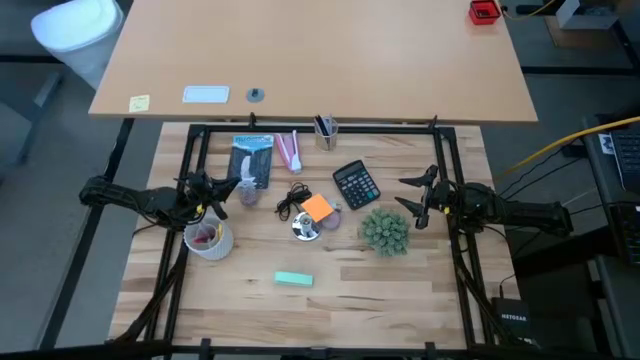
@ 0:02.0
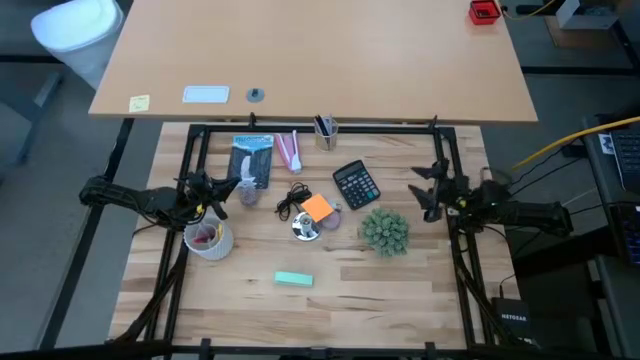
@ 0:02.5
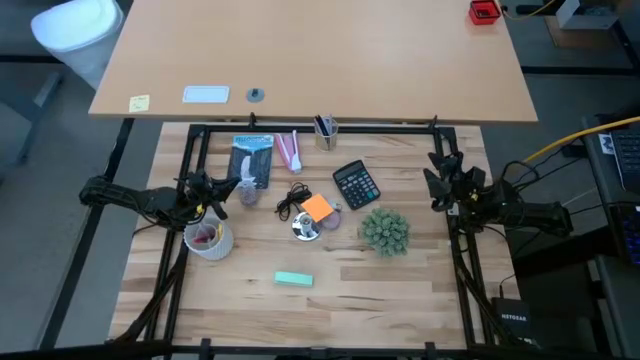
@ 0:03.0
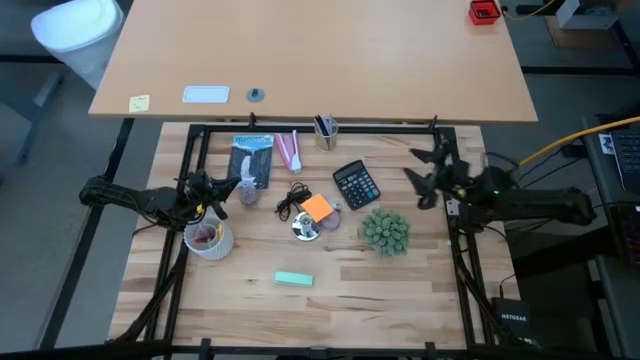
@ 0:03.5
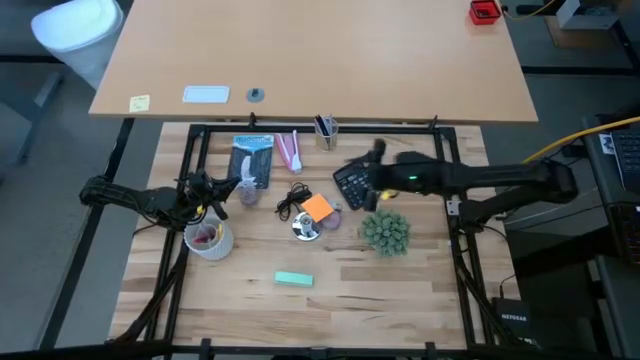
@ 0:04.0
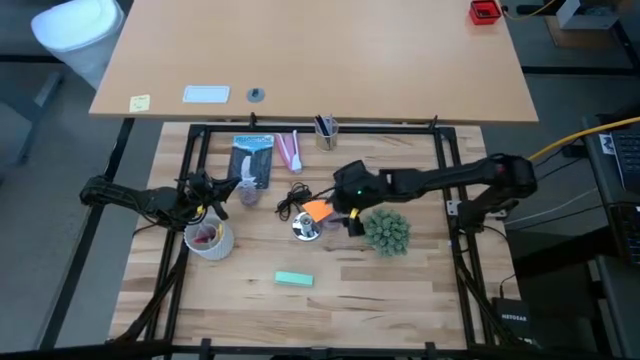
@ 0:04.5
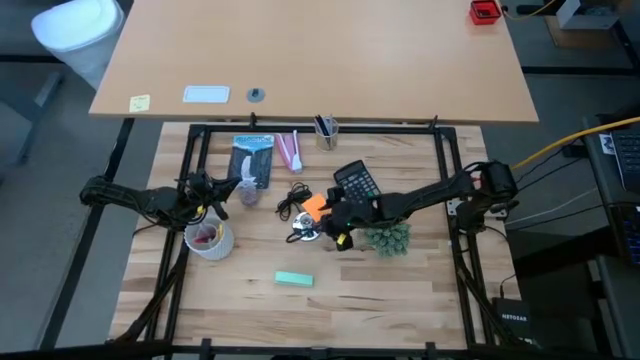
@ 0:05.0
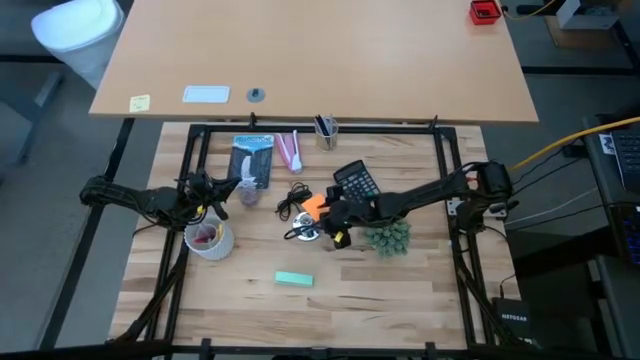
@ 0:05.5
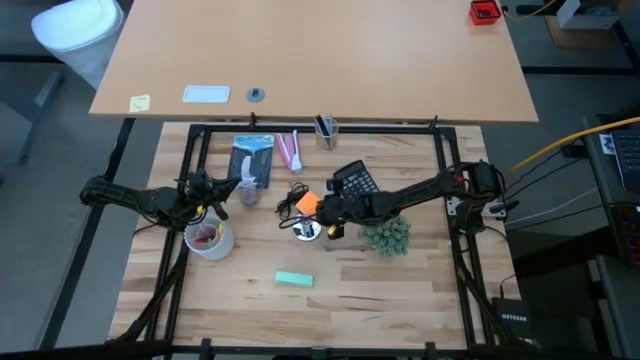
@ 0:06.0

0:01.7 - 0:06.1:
Task: Screw lightbulb
Adjust the sticky note on the table

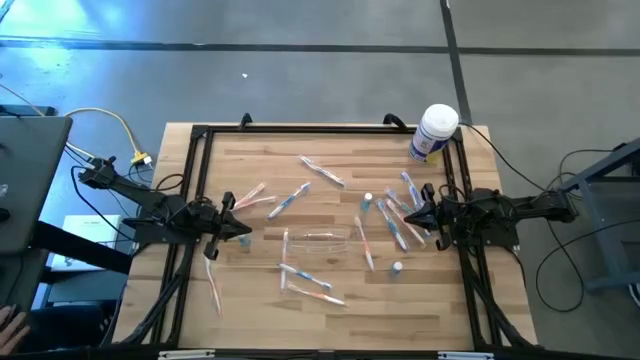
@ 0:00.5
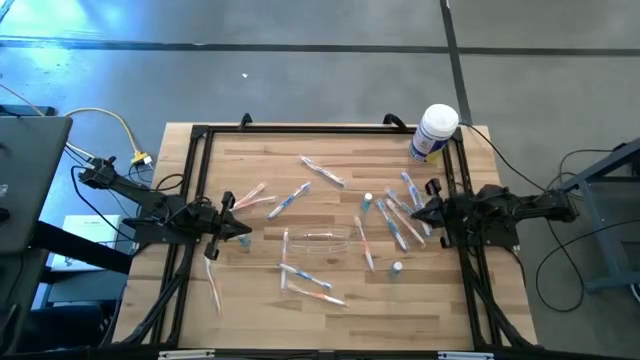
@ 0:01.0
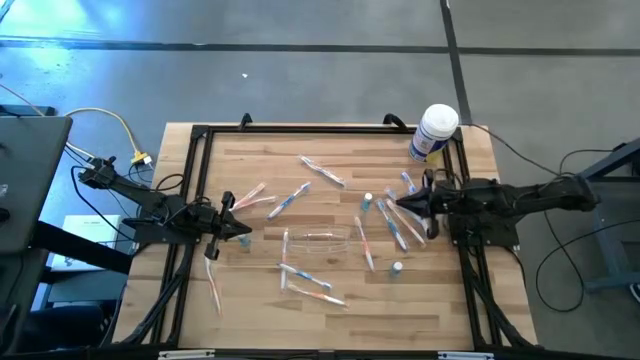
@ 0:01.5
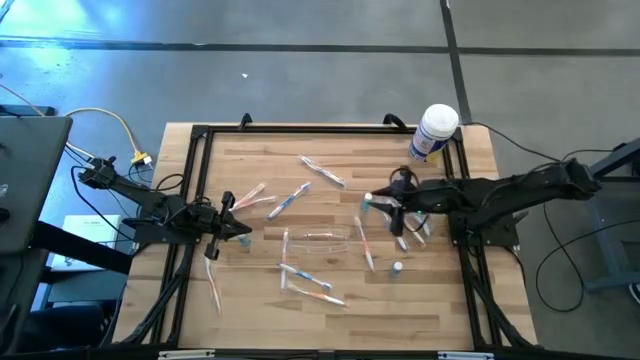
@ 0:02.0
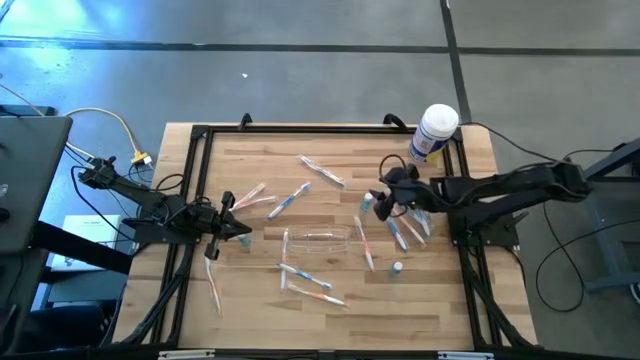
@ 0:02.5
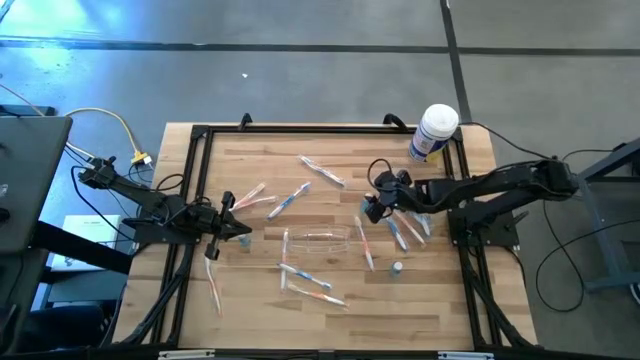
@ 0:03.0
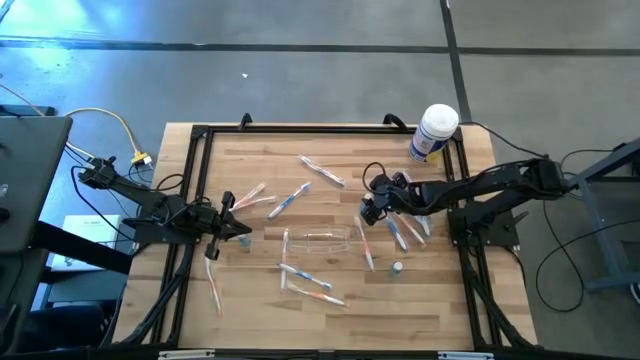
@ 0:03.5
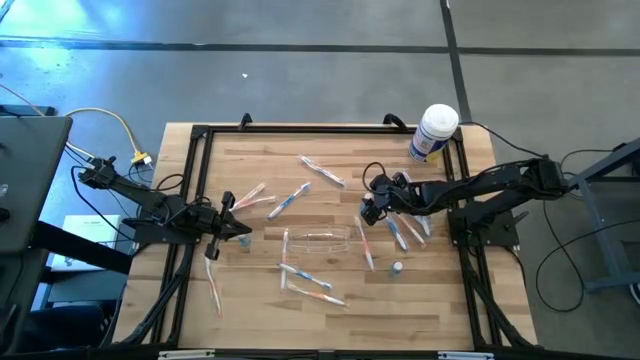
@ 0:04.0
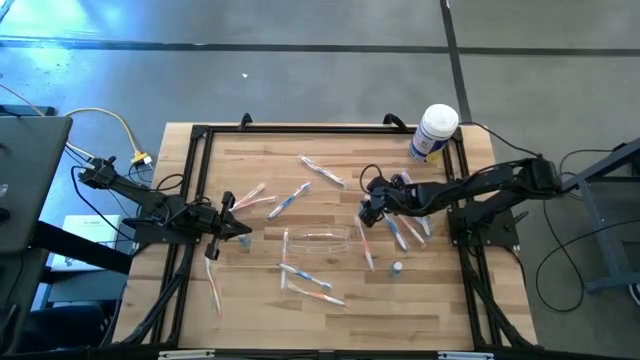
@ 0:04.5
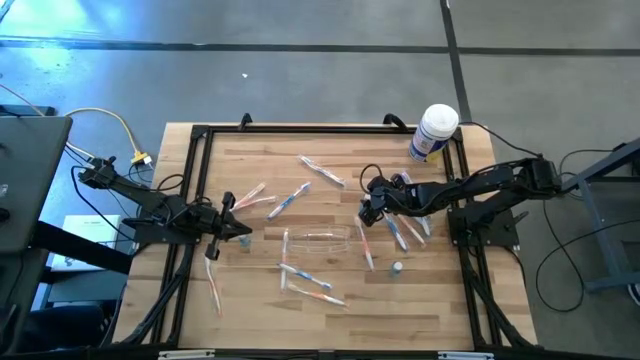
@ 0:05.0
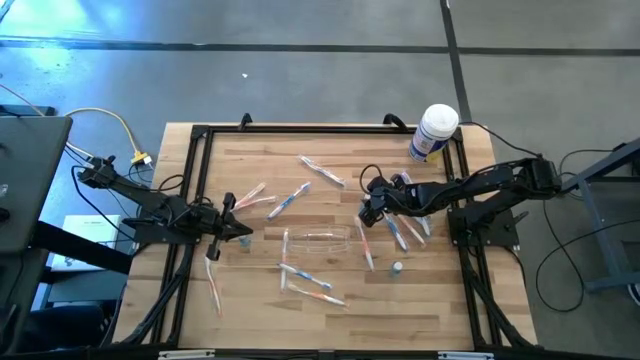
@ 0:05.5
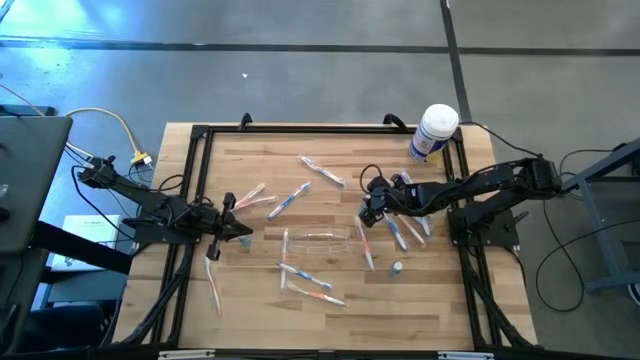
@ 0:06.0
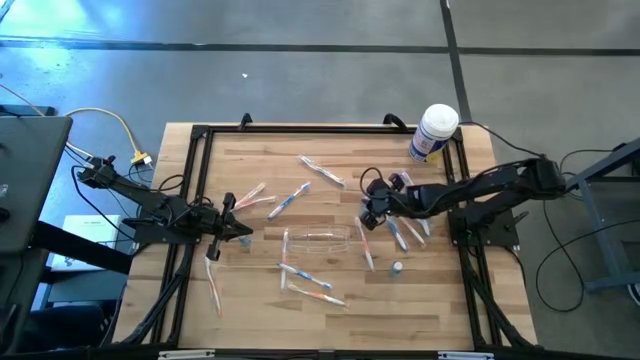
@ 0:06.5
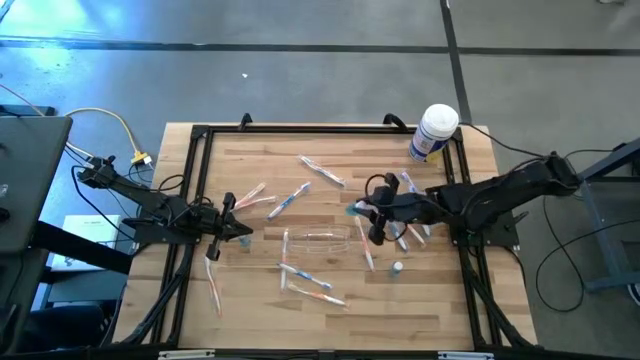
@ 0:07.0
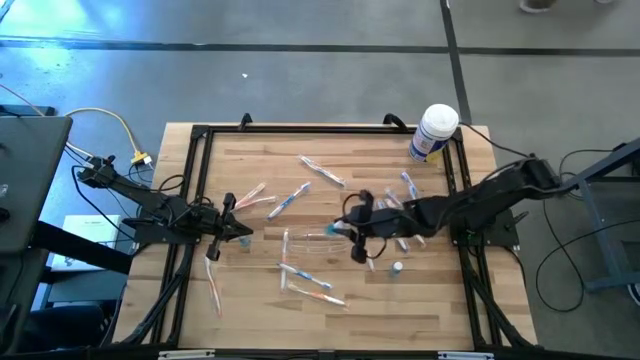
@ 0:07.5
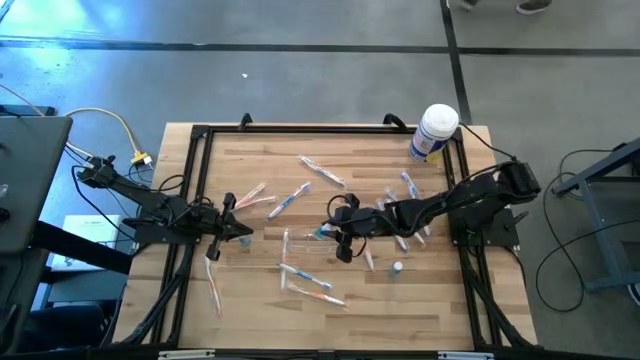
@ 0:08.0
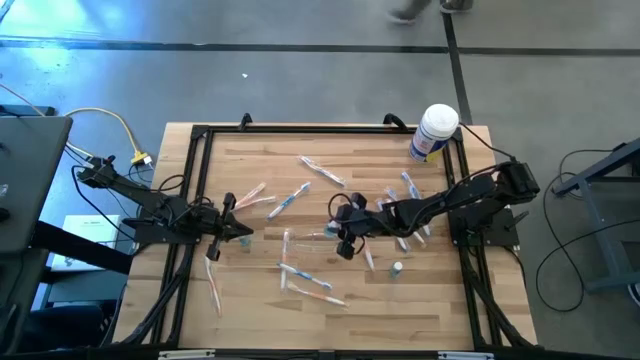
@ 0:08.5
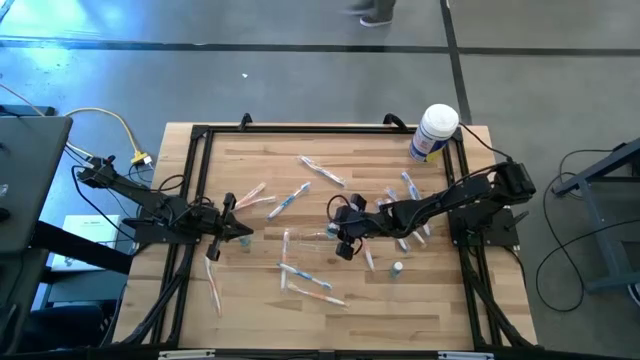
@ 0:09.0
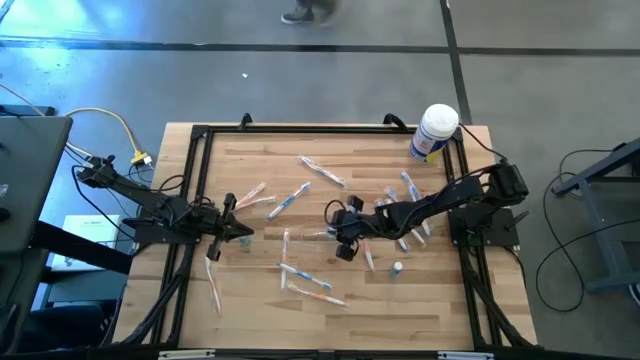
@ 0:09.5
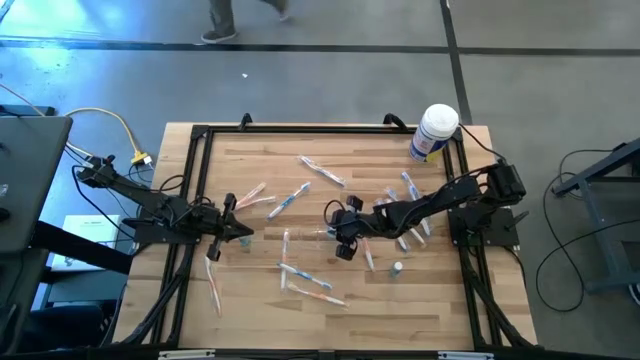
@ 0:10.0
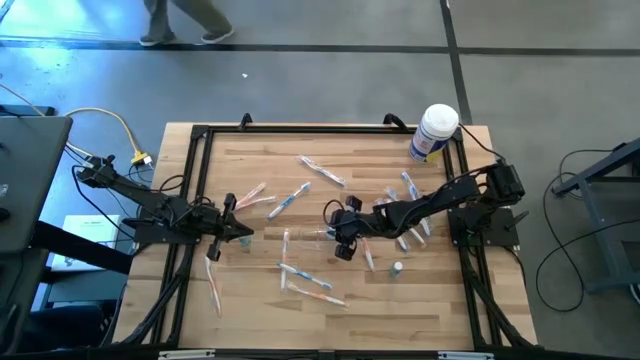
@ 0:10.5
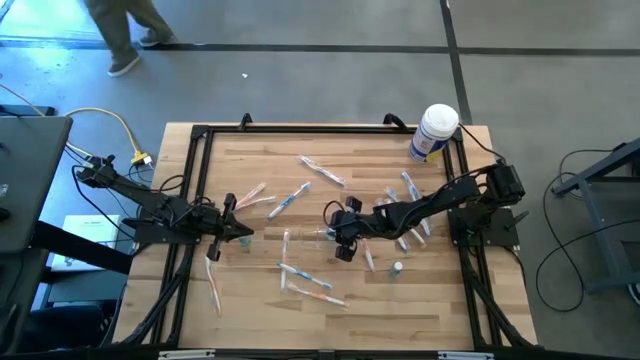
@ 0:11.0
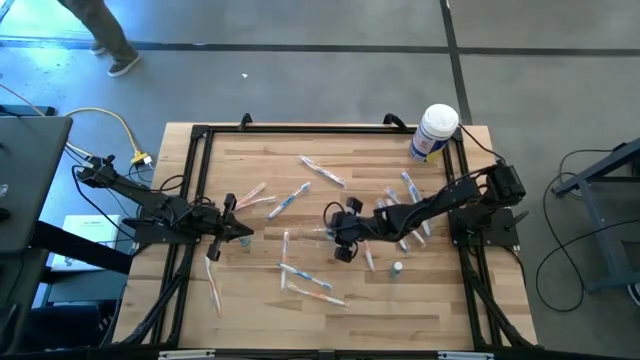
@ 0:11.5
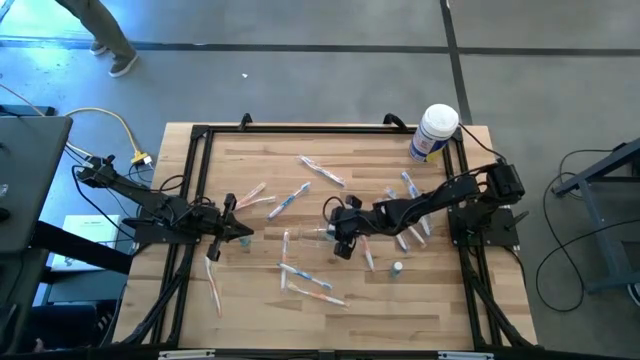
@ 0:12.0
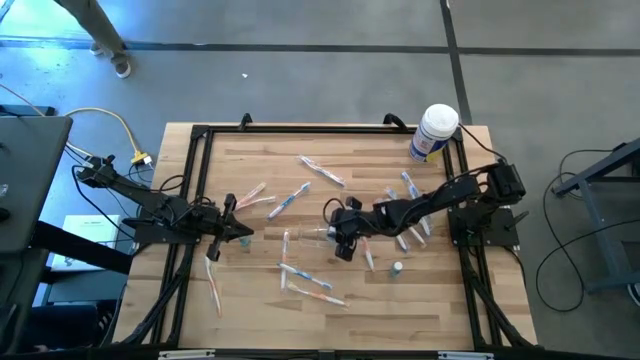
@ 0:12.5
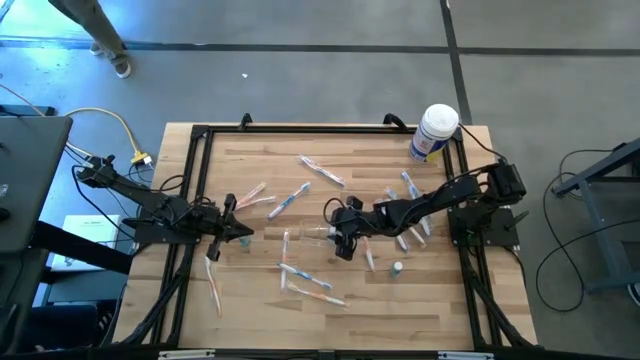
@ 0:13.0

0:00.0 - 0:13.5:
Task: Pick & Place toothbrushing station
Put the blue mouthwash bottle into the transparent organizer
